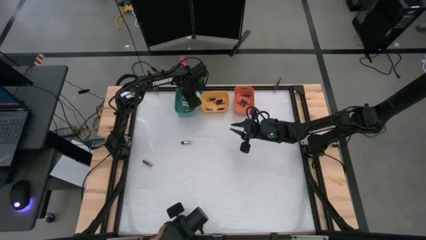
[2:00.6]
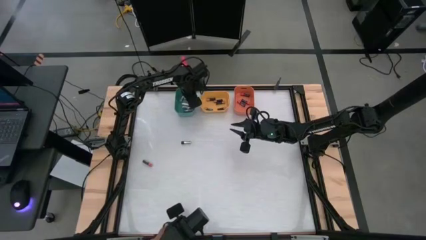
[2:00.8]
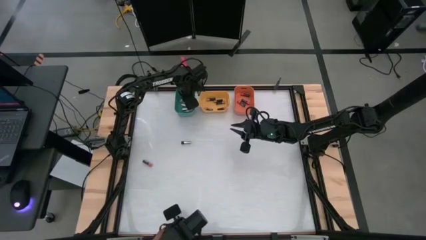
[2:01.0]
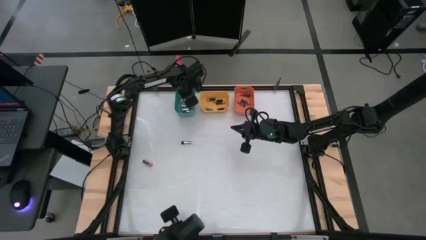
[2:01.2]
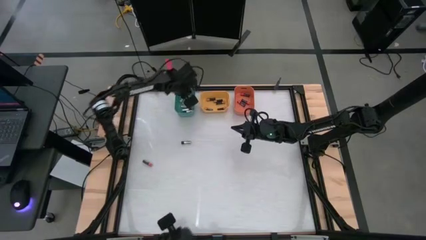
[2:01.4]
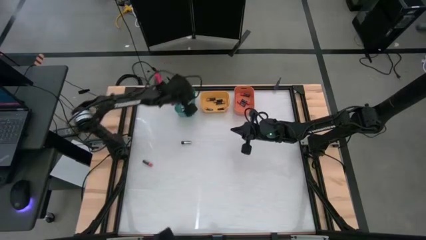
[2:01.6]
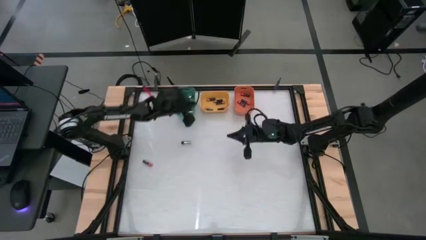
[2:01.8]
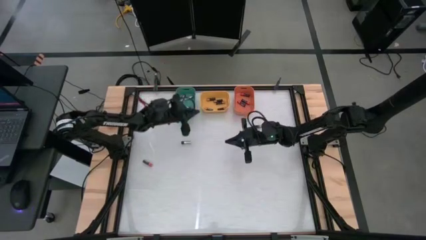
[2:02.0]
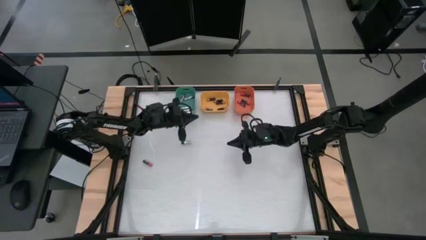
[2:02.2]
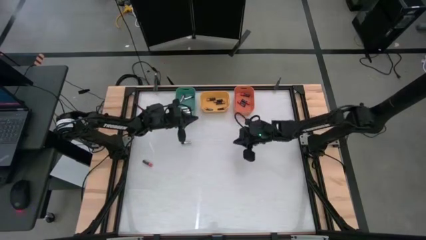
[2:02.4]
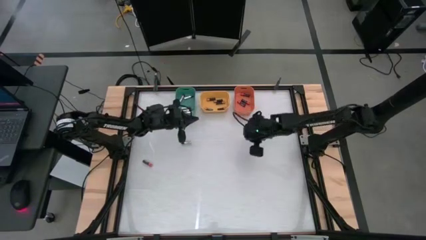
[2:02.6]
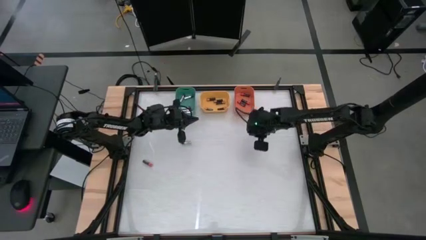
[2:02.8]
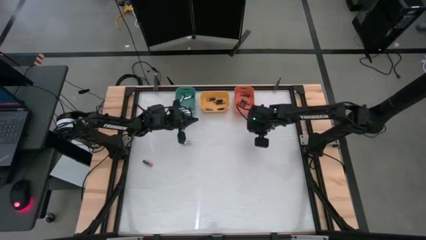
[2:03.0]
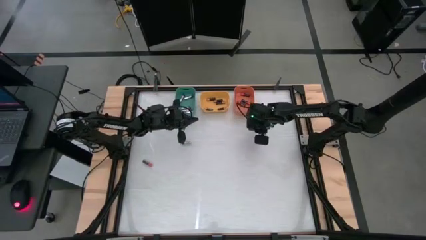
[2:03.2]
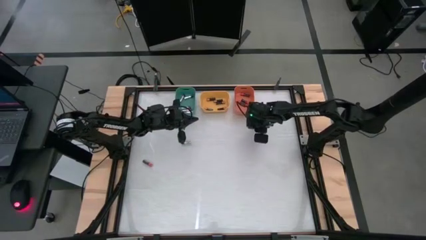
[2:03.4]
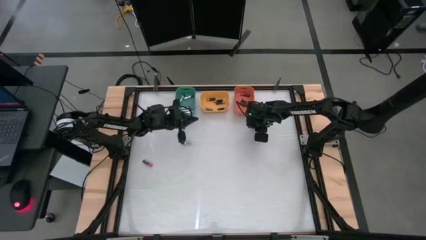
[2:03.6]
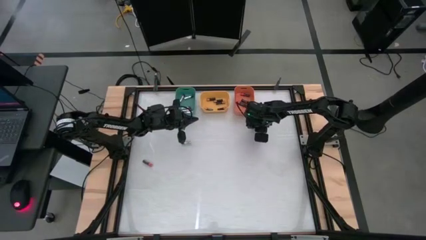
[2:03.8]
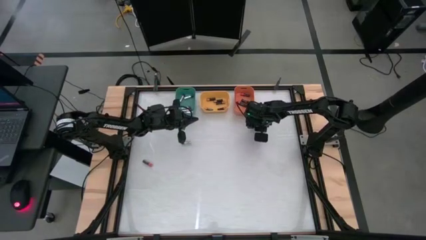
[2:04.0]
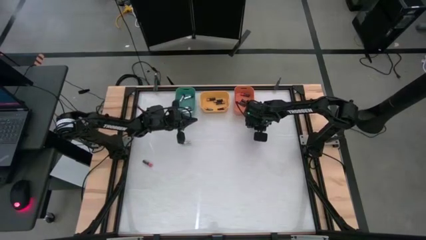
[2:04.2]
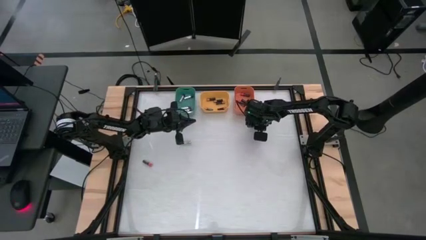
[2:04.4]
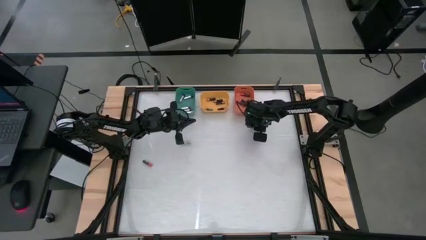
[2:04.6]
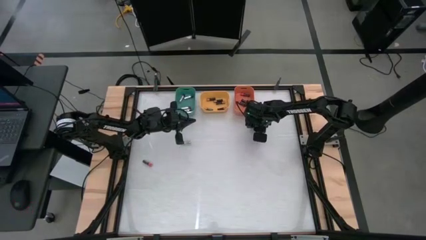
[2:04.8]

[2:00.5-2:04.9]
Task: Sort batteries
Put the brown battery into the yellow bin

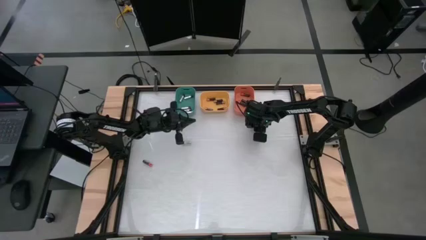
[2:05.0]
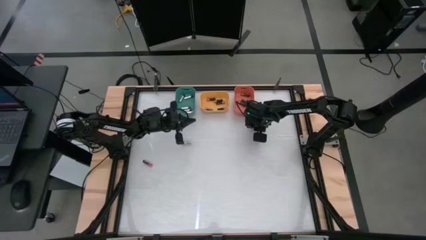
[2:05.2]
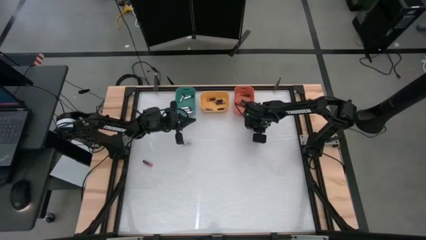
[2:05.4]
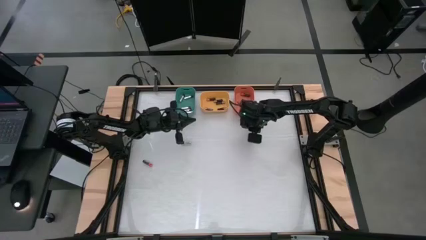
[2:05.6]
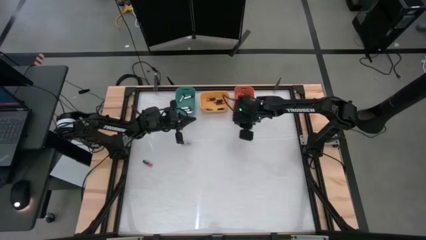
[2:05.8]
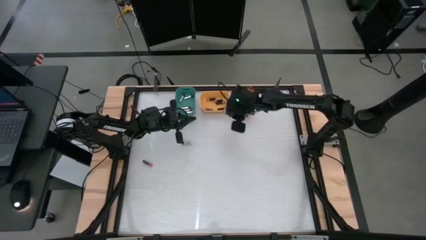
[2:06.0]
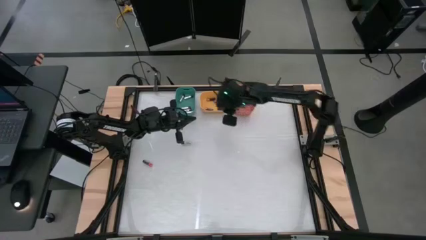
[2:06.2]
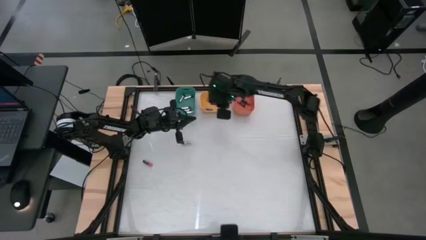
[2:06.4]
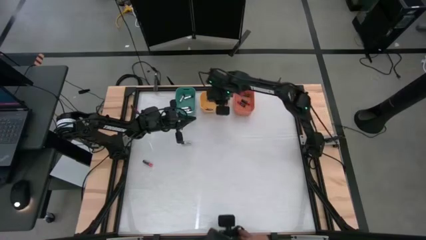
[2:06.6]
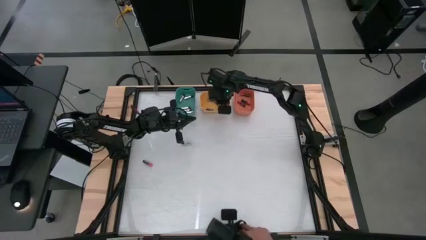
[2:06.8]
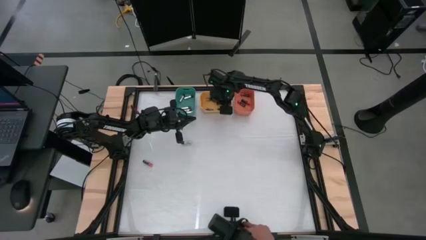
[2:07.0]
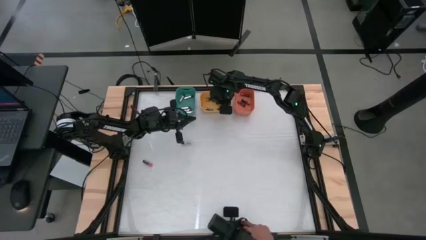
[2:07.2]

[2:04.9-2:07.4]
Put the brown battery into the yellow bin

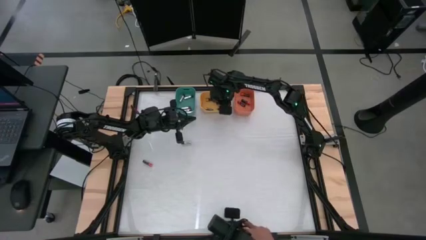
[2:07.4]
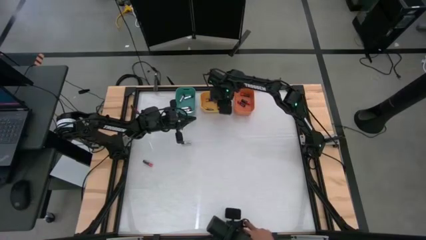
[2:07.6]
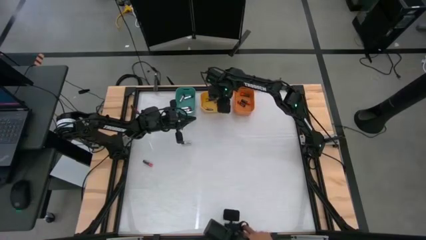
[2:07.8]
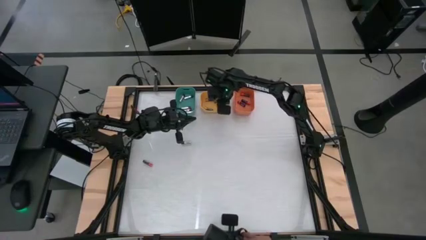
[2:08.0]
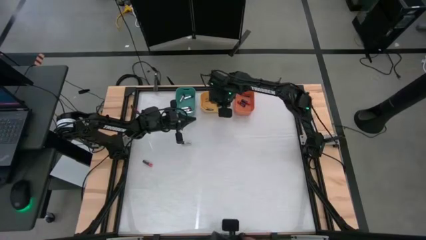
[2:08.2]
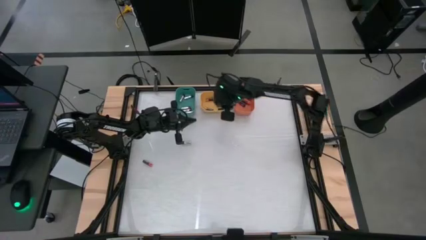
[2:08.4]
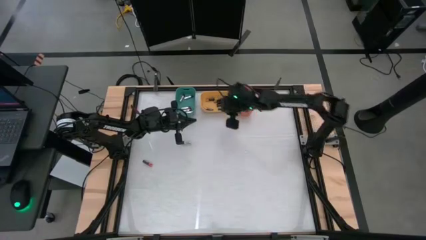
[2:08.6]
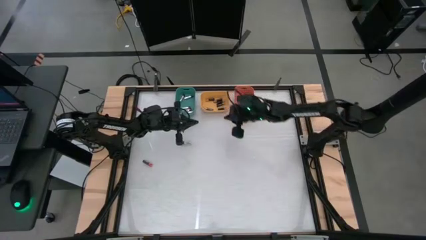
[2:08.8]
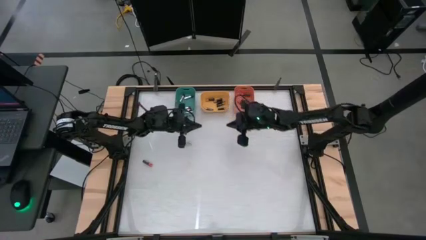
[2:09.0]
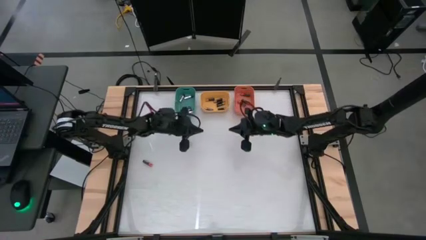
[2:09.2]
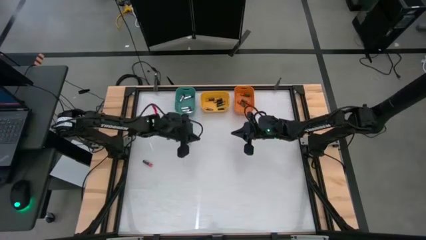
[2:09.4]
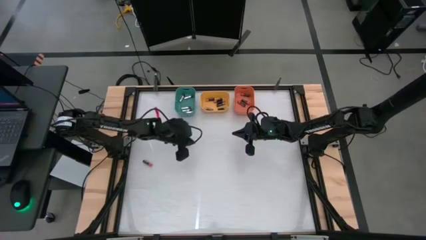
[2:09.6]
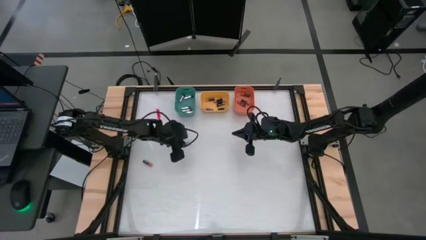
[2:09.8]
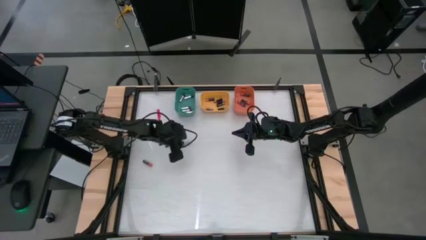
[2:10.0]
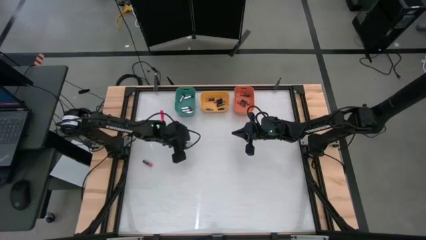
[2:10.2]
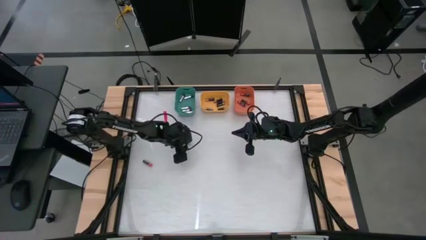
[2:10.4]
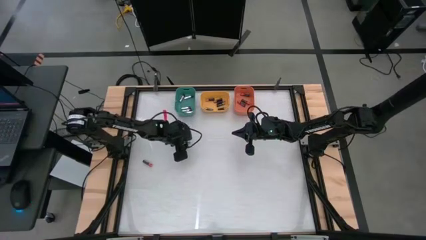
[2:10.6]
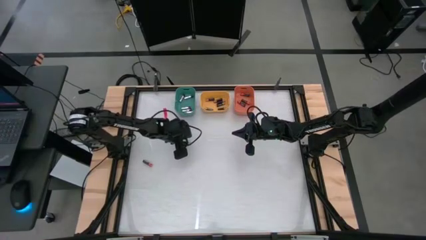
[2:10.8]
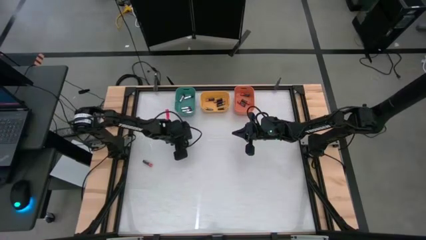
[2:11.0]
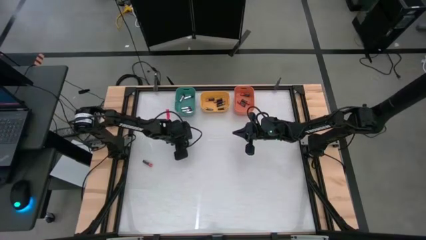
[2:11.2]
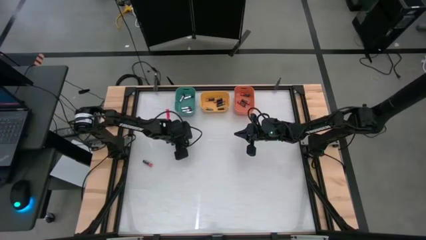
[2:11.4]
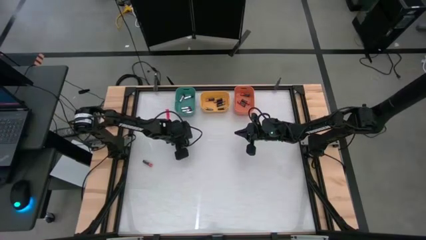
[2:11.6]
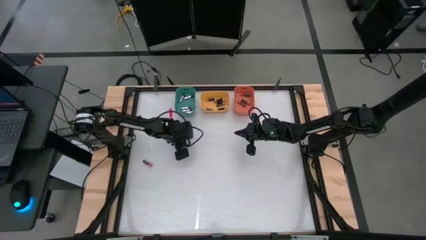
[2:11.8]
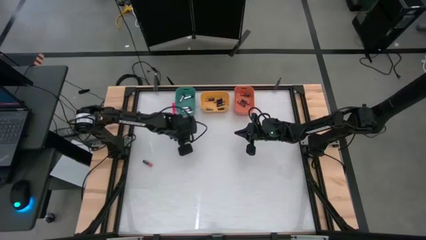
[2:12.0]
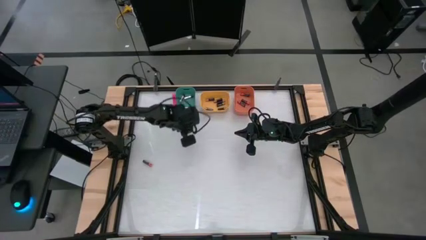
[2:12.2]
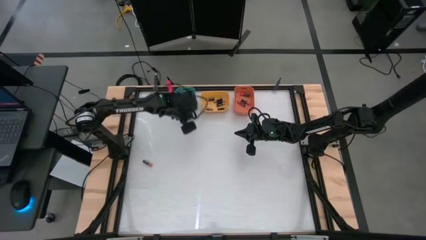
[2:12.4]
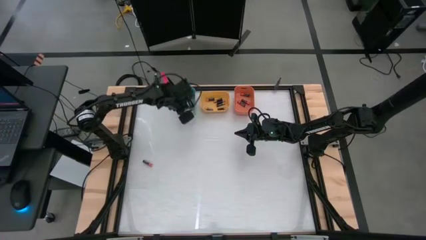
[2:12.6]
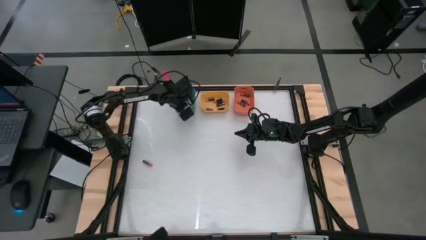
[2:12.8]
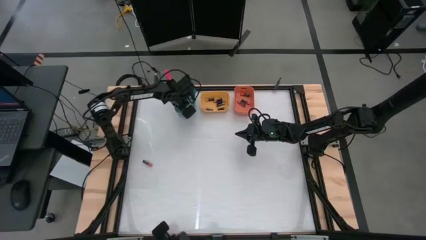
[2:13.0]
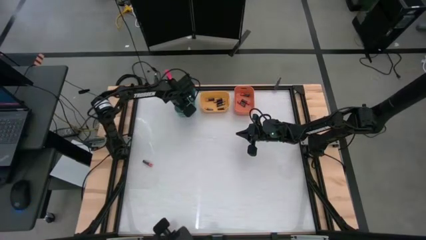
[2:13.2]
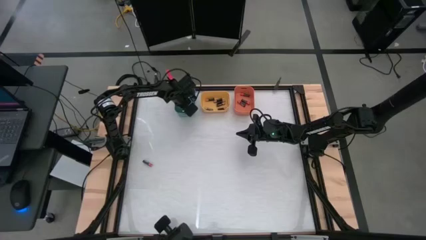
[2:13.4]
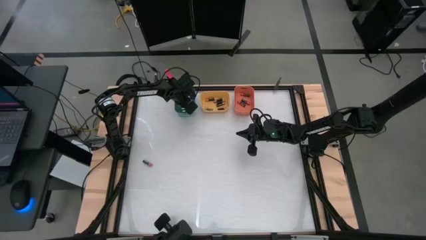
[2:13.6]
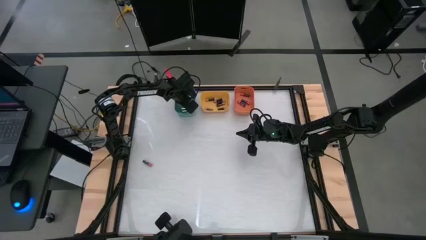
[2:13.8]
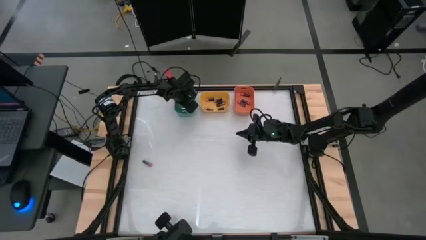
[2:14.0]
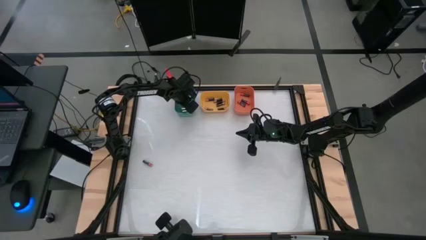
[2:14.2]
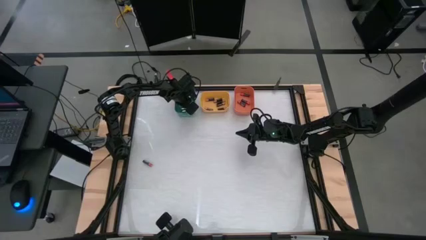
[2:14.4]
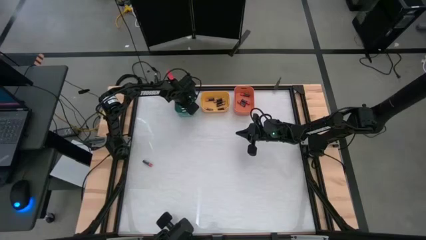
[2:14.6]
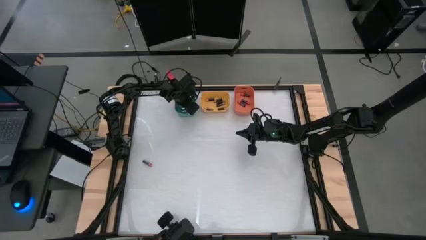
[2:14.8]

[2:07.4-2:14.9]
Put the silver battery into the green bin

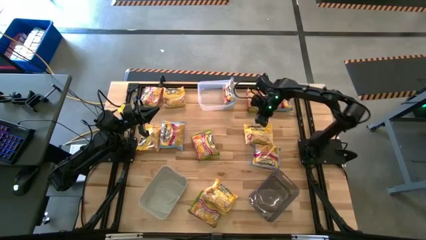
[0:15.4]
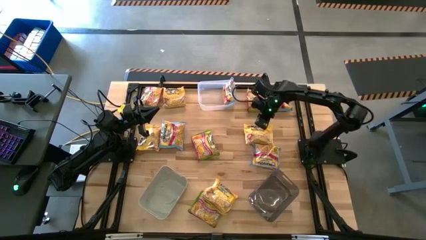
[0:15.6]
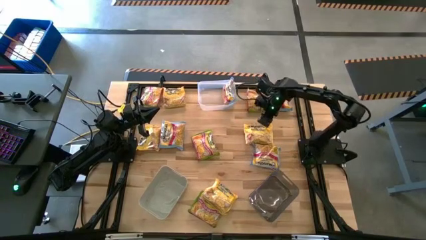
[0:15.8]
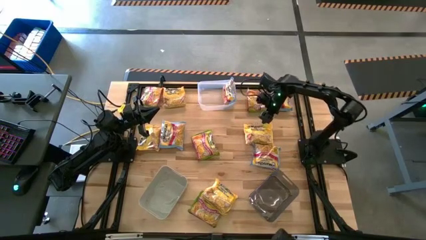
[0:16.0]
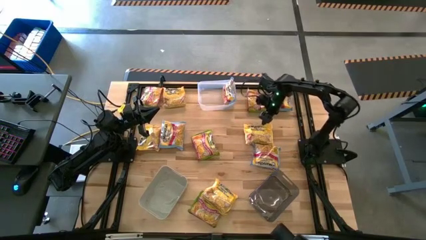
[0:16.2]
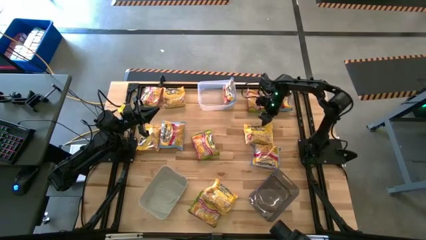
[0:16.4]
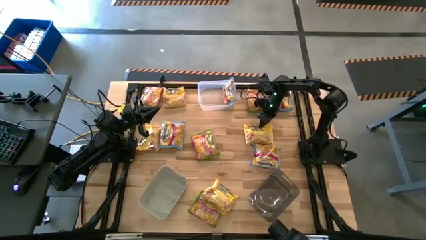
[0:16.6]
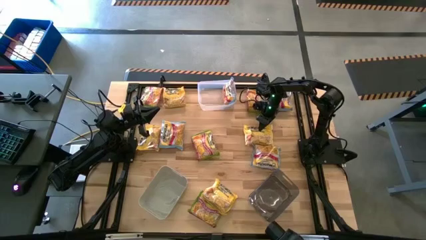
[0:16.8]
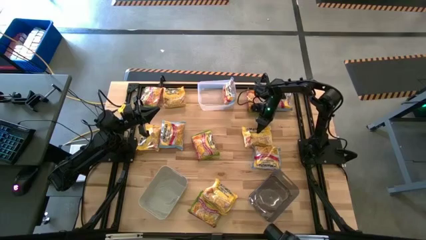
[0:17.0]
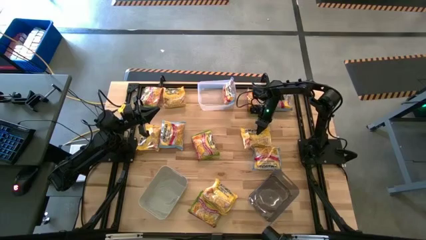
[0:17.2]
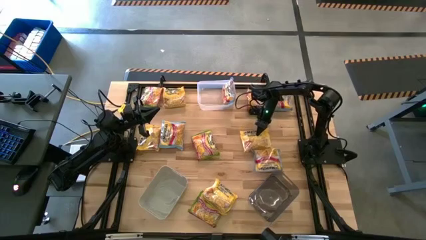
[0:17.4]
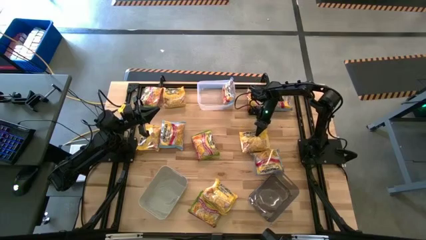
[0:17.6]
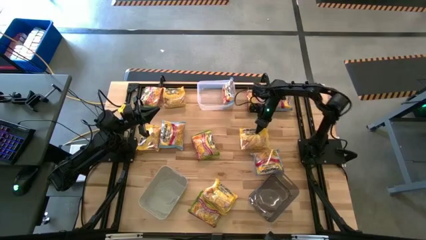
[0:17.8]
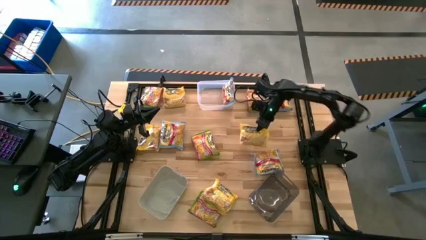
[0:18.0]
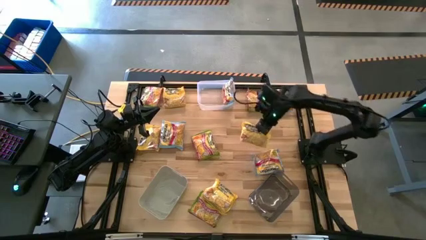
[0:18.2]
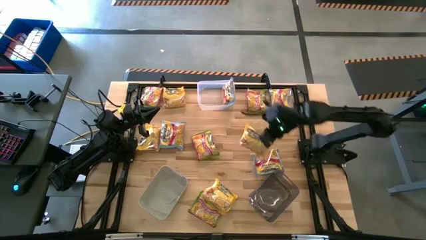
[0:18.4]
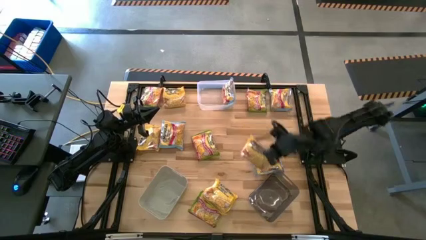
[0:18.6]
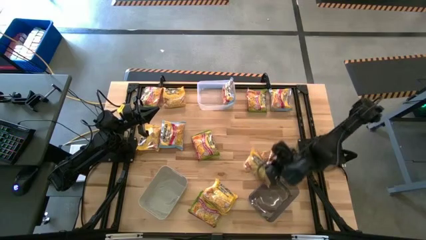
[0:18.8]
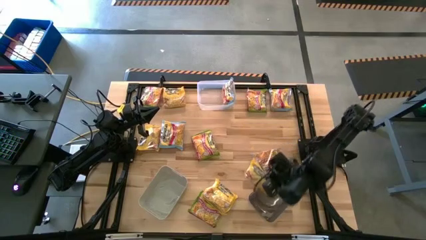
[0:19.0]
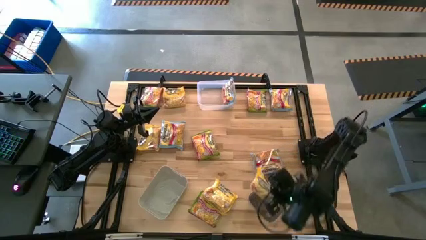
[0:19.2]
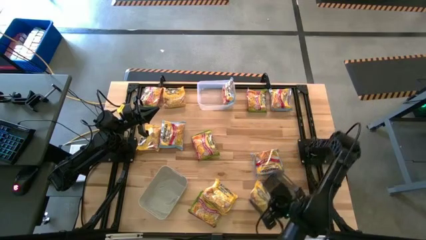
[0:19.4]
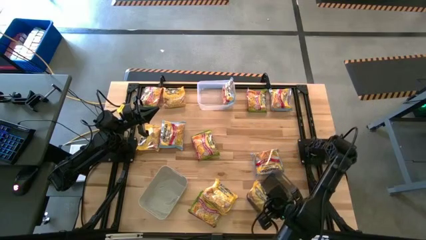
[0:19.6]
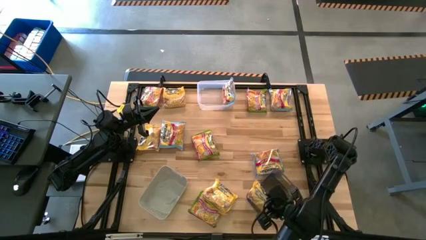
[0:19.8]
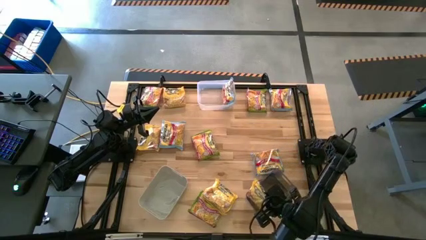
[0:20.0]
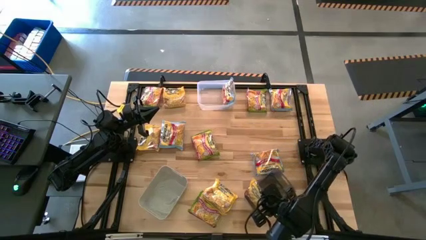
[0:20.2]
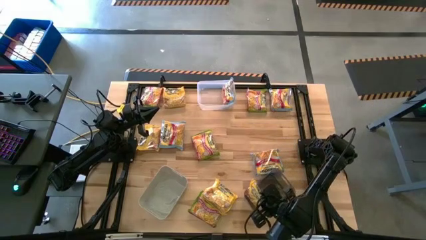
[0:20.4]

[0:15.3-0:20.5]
Task: Sort Maruchan noodles
Put the yellow noodle pack into the black bin
